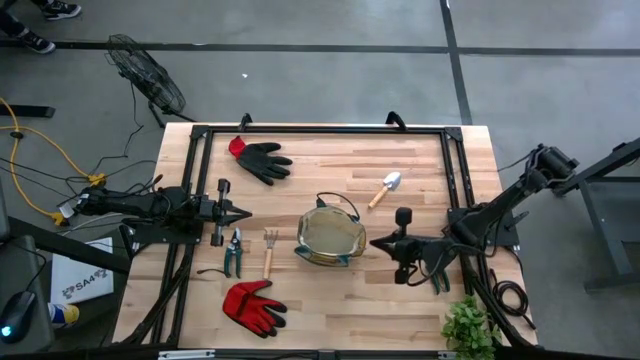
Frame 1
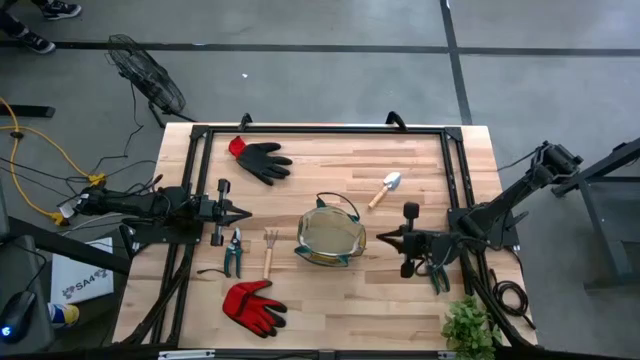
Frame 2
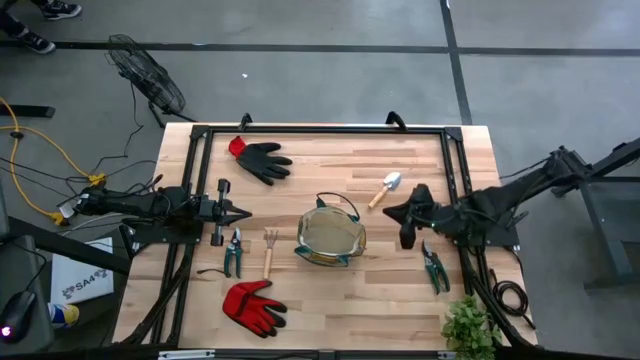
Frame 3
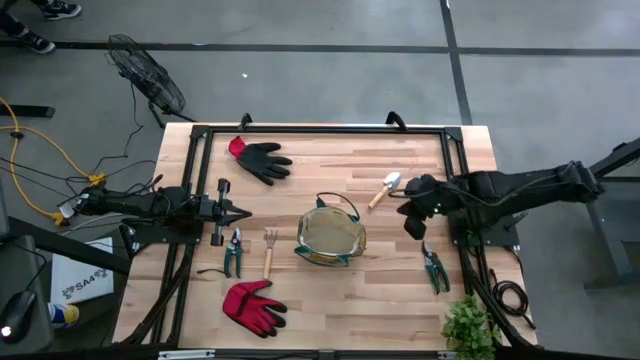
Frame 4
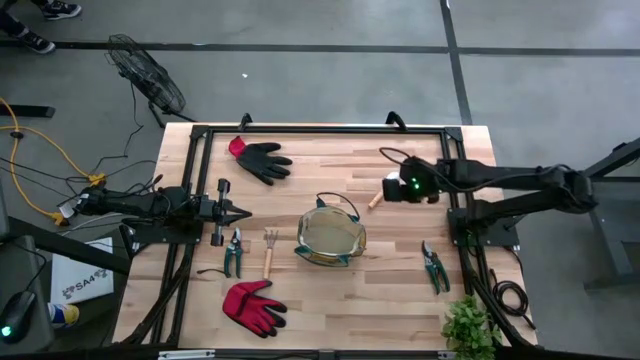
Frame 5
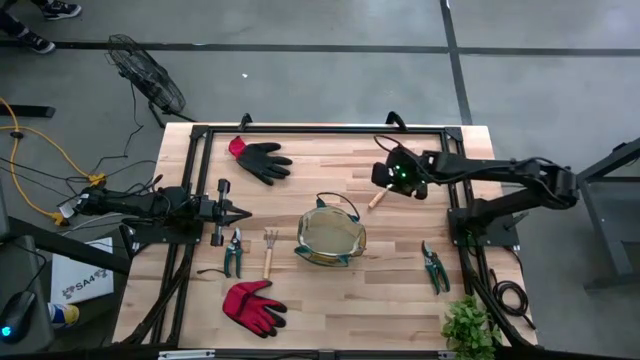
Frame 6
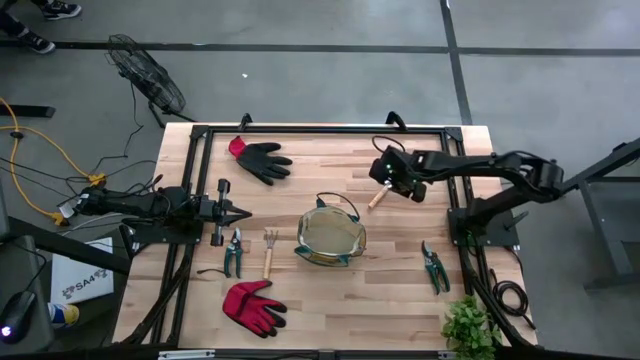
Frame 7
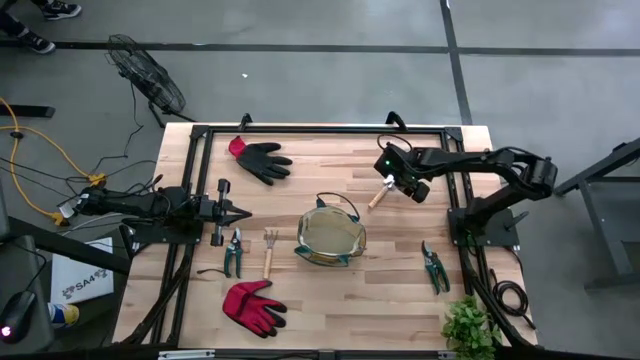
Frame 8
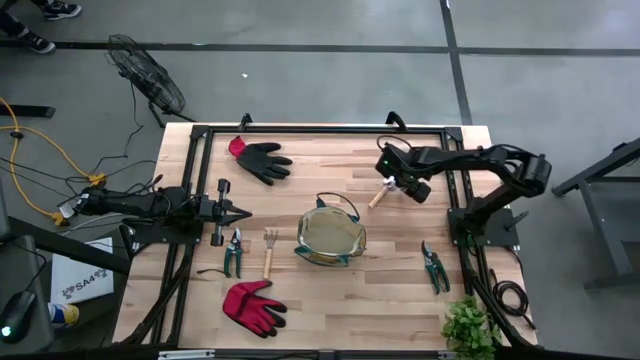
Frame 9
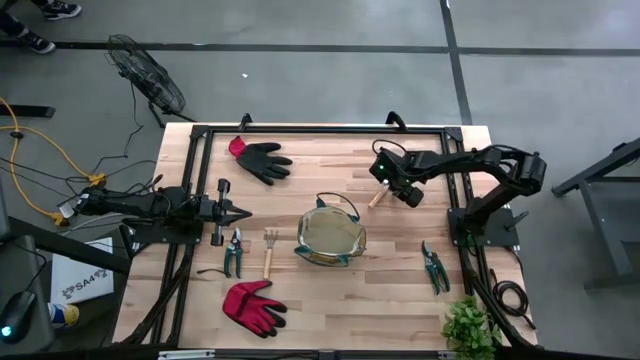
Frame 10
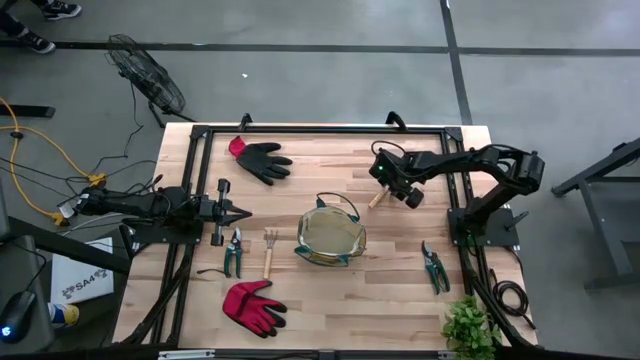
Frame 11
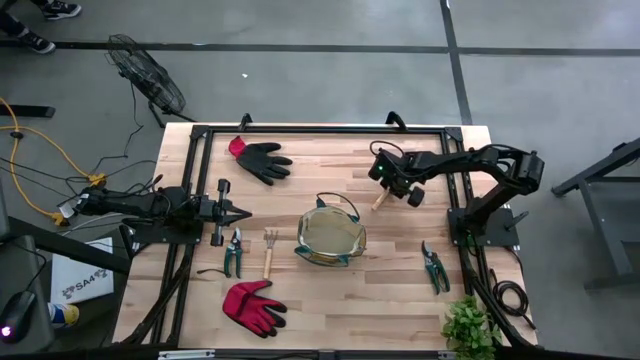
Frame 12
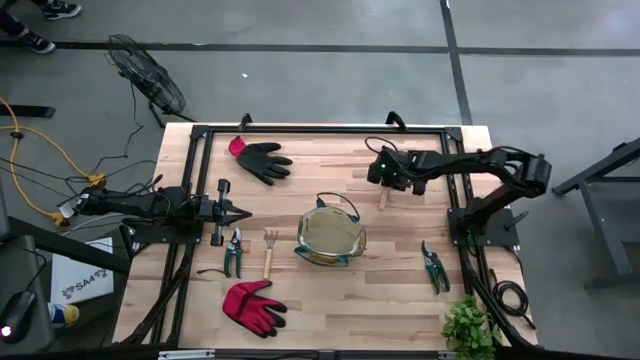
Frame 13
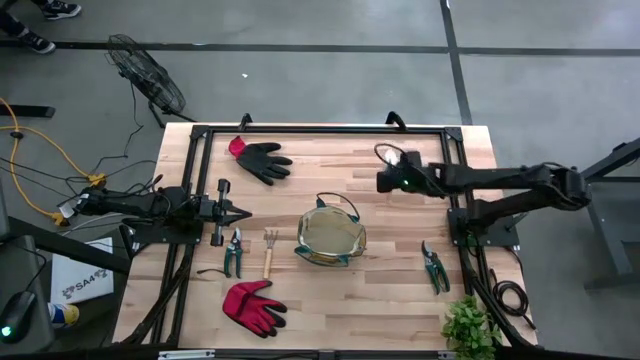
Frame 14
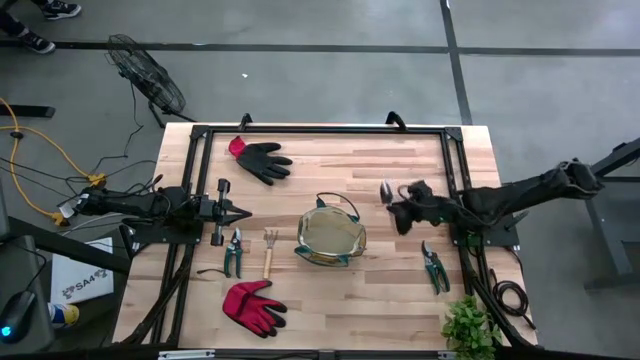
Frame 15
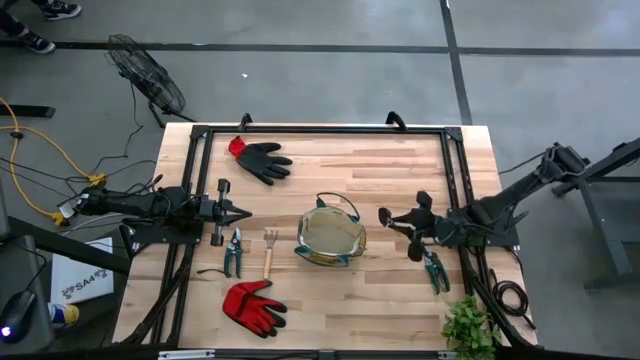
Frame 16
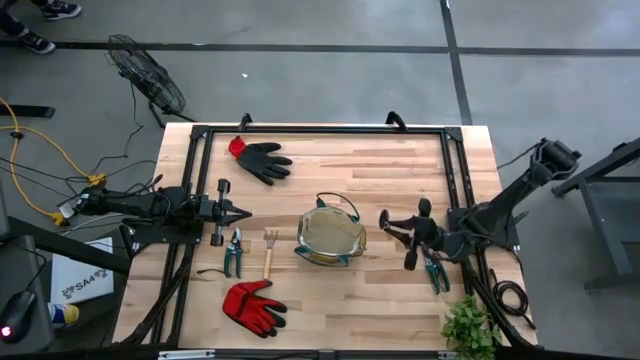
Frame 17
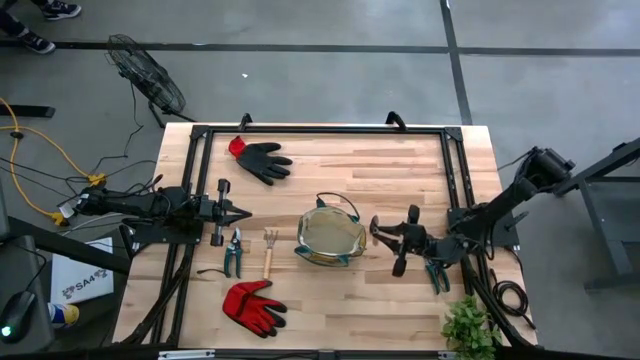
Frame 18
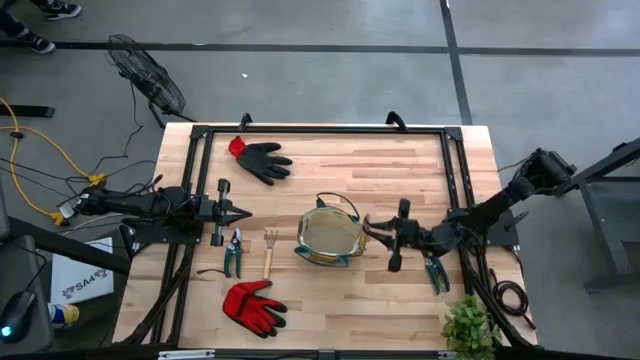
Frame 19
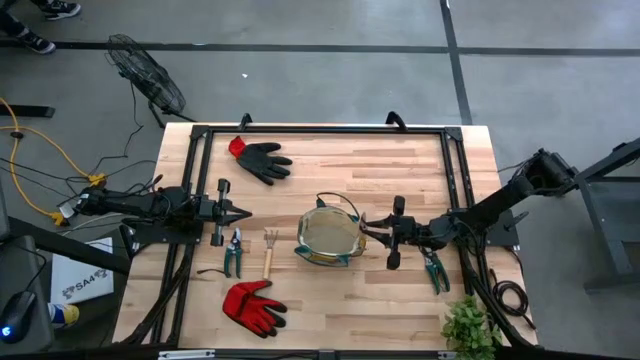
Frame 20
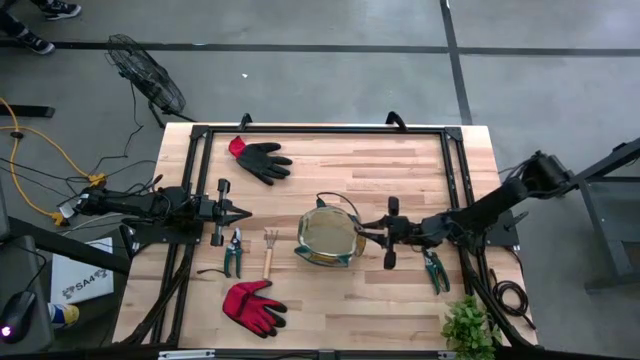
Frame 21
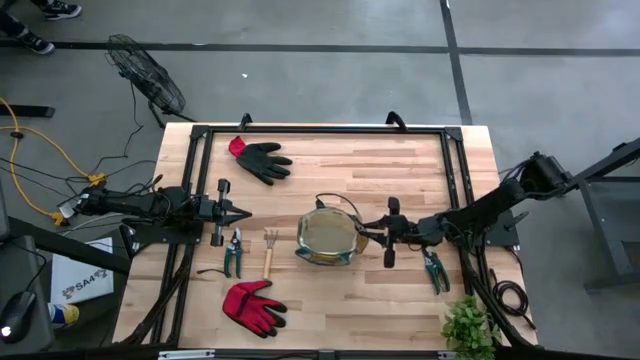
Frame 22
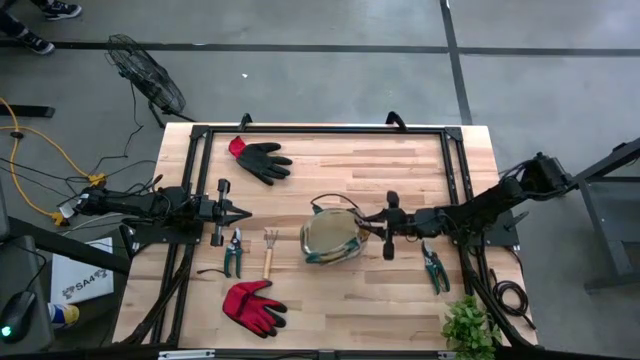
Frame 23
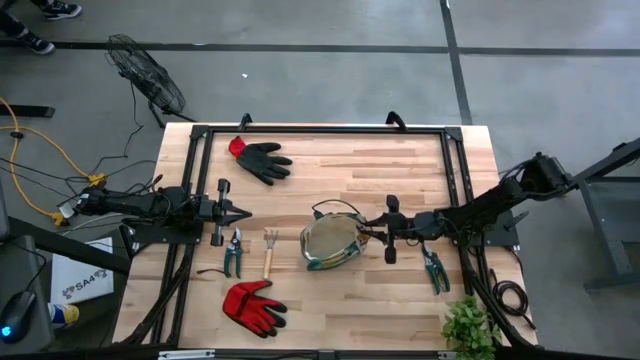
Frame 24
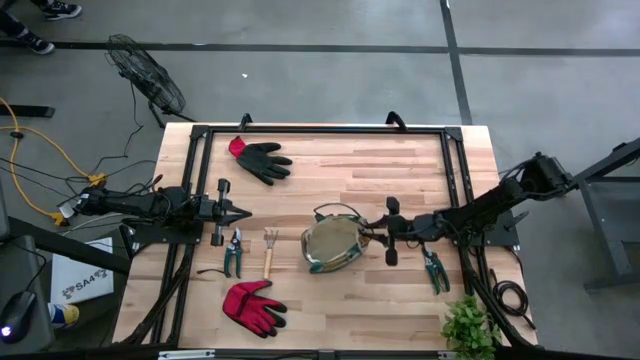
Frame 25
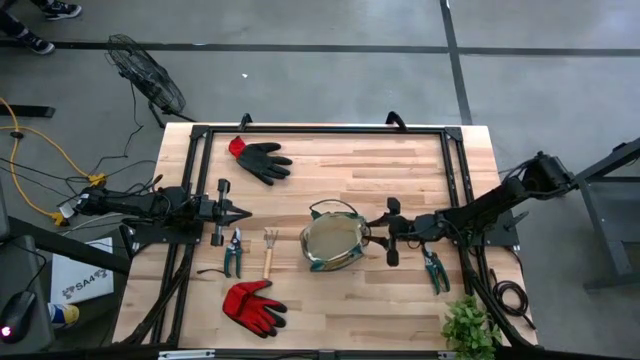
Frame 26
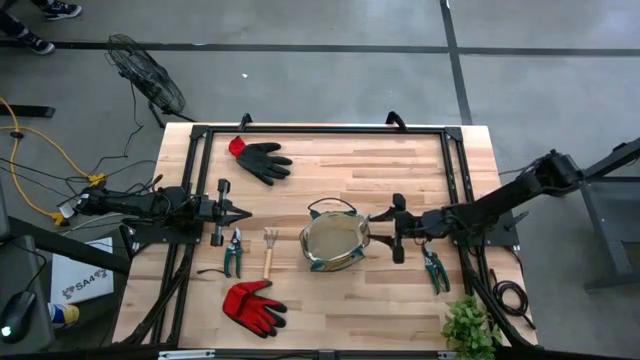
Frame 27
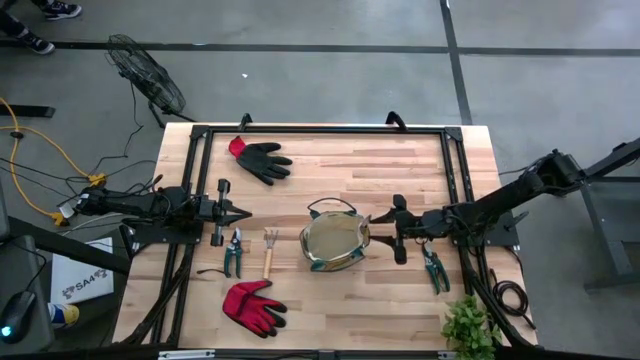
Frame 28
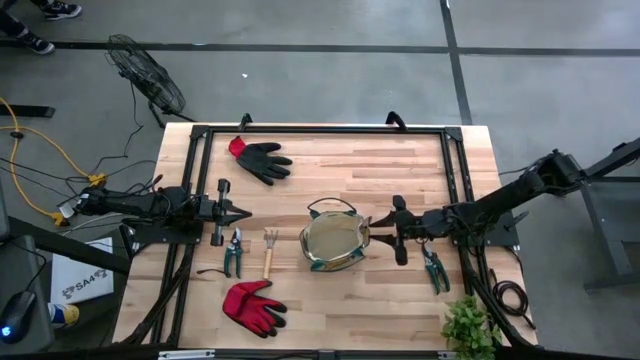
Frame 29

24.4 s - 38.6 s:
Task: Pick & Place Garden tools in Gardening bag
Put the brown trowel into the gardening bag

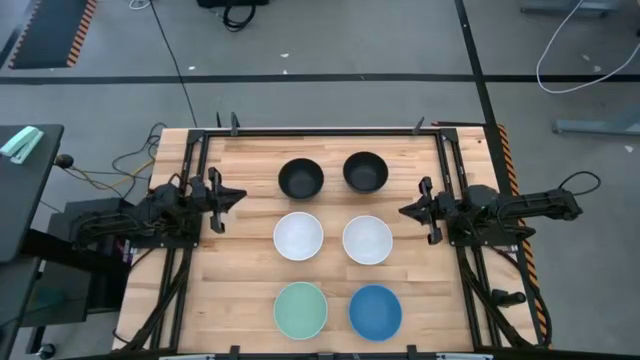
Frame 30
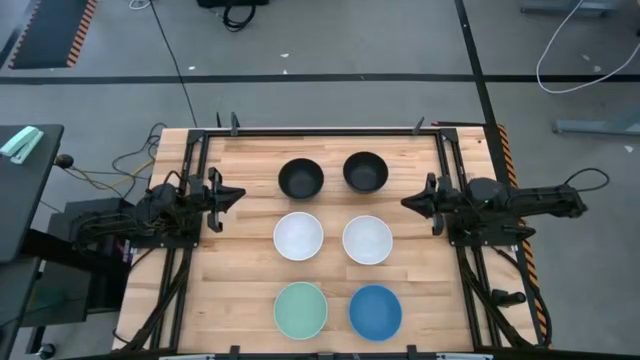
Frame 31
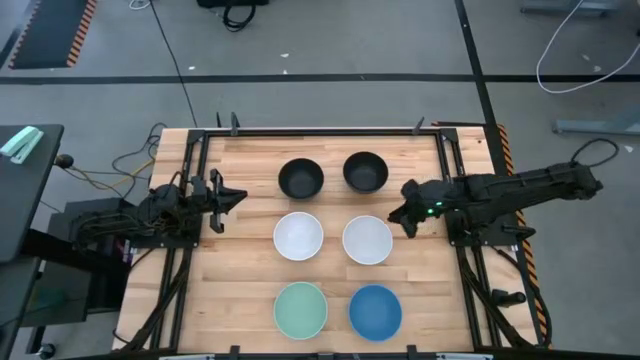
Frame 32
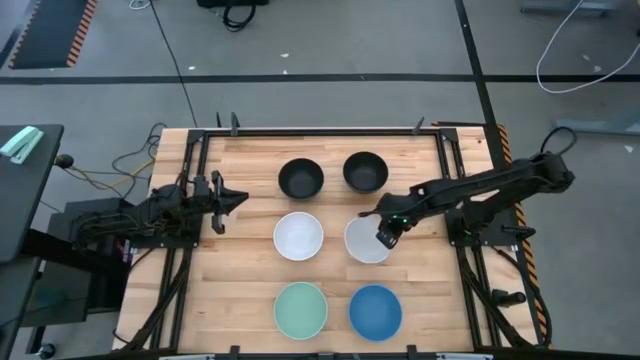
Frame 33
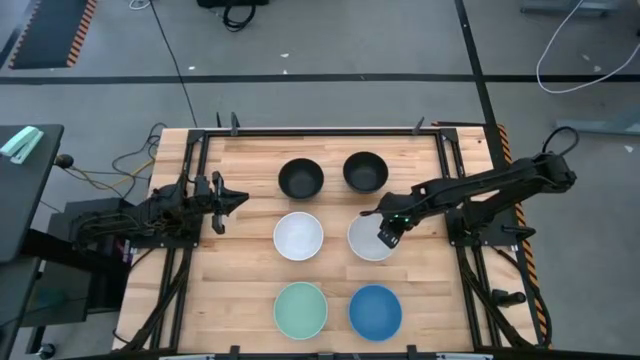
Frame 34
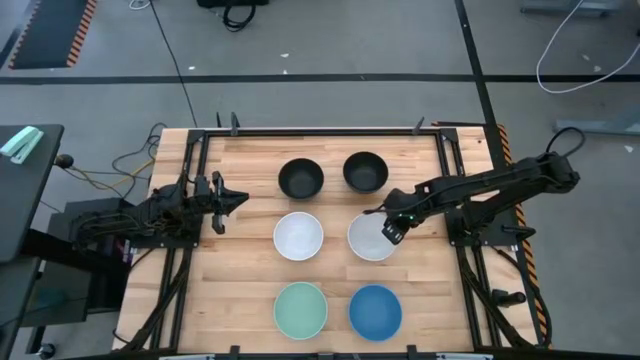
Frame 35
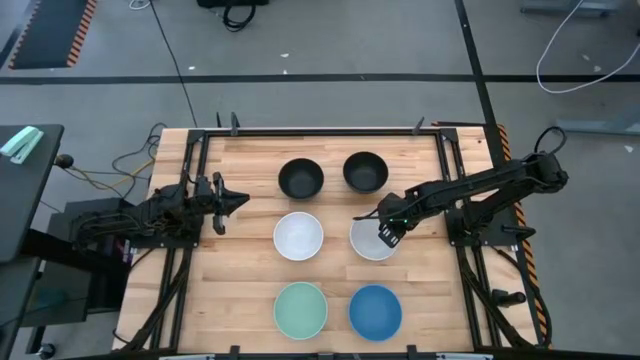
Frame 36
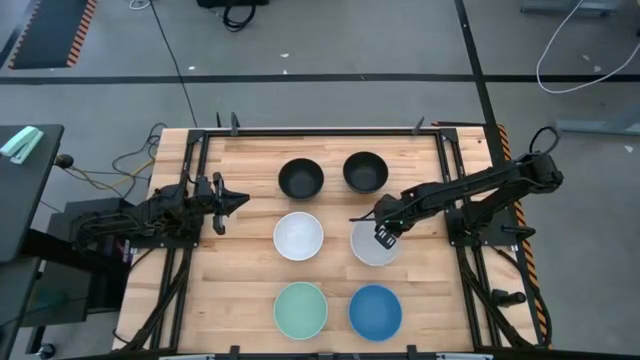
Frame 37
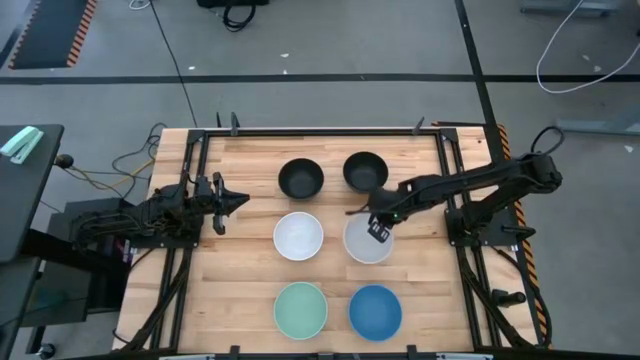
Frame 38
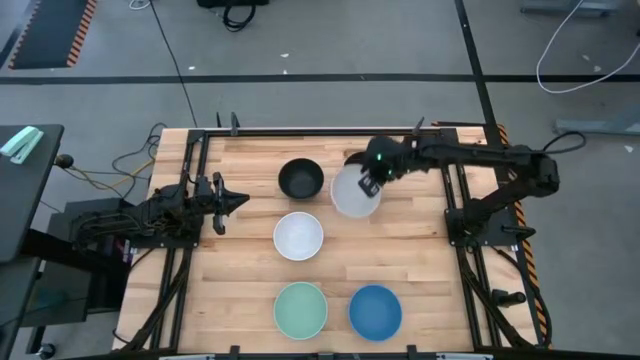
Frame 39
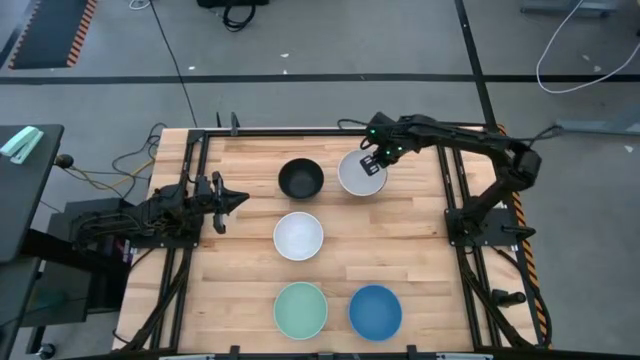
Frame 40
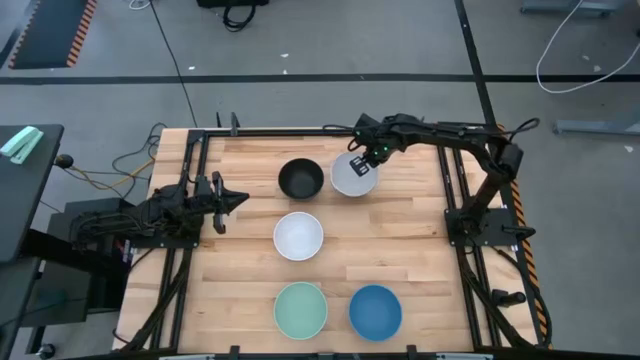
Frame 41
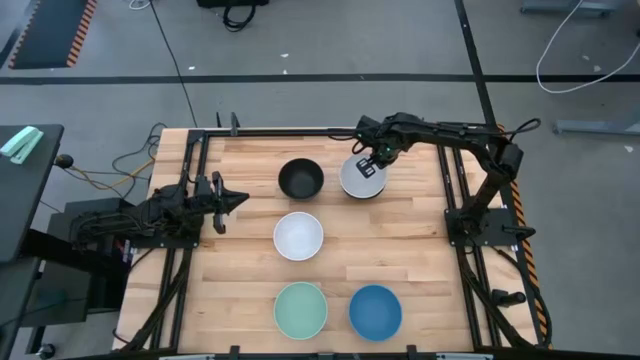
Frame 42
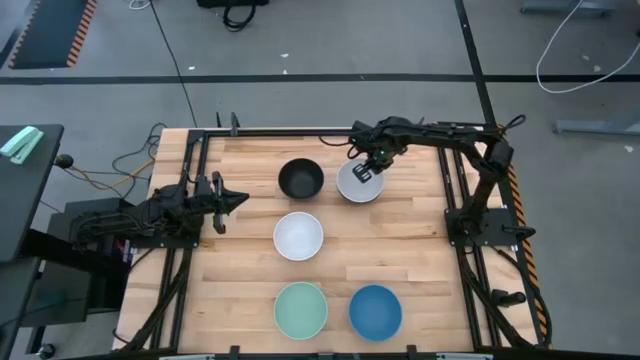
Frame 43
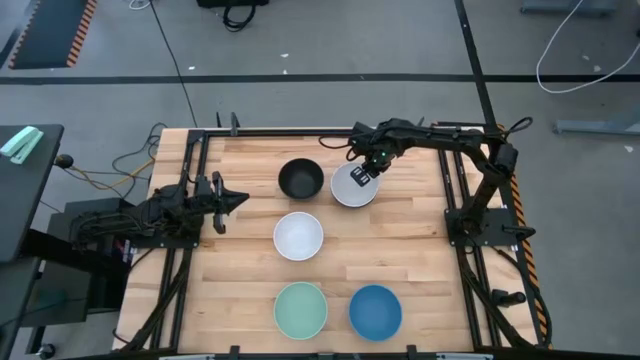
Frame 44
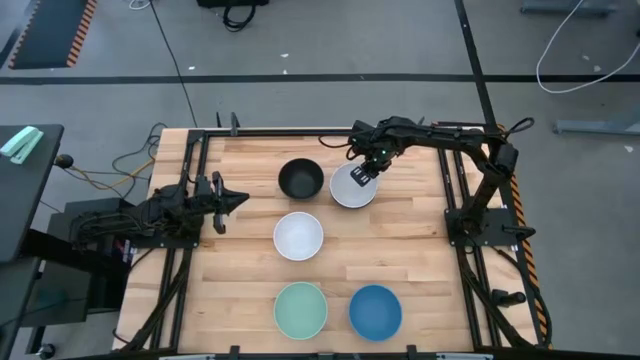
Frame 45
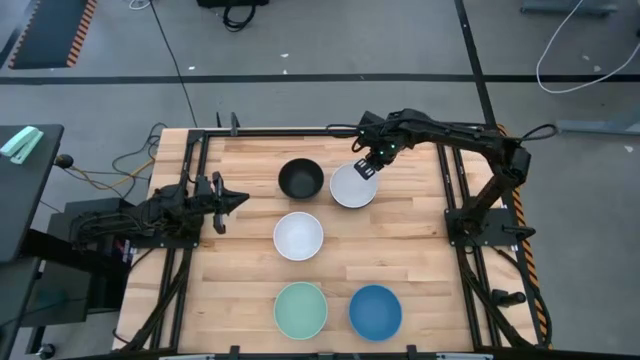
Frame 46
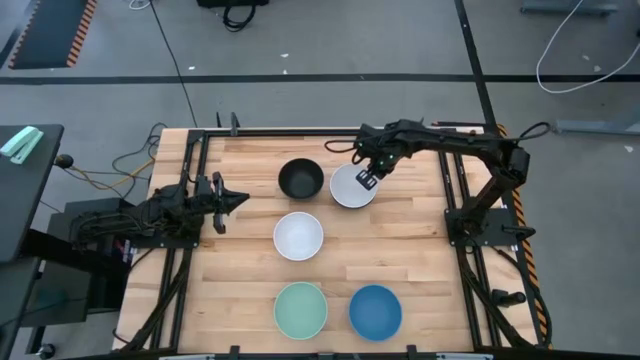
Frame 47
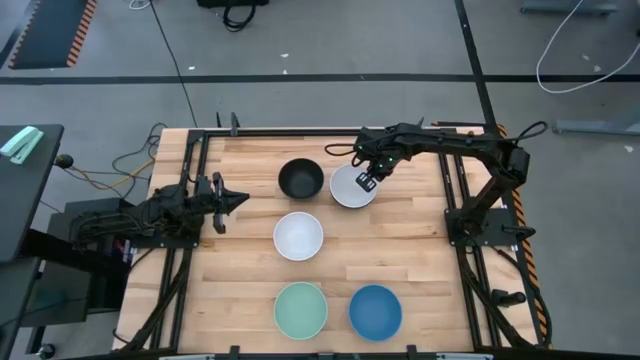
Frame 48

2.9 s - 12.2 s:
Task: Nest bowls inside each other
Stack the right white bowl on the right black bowl
